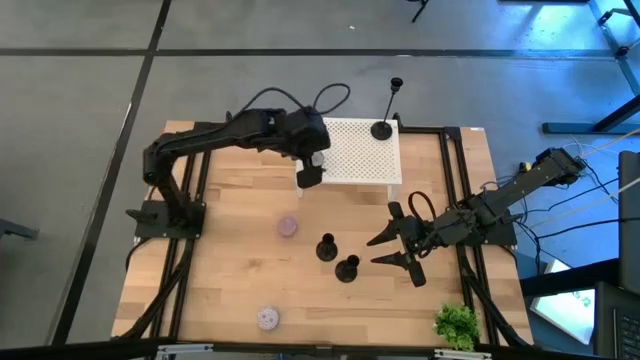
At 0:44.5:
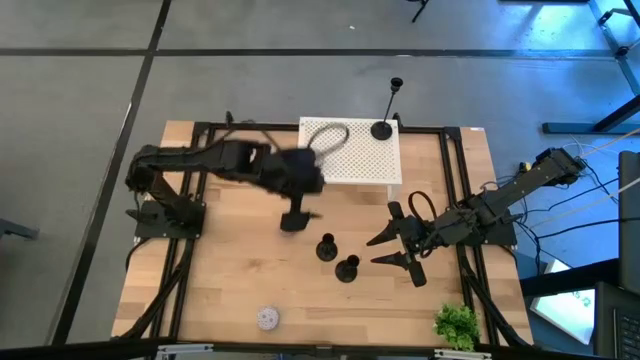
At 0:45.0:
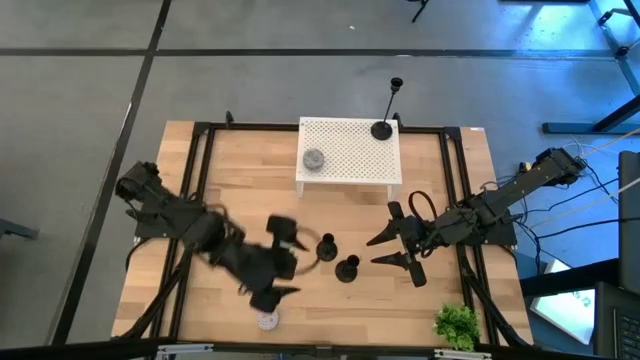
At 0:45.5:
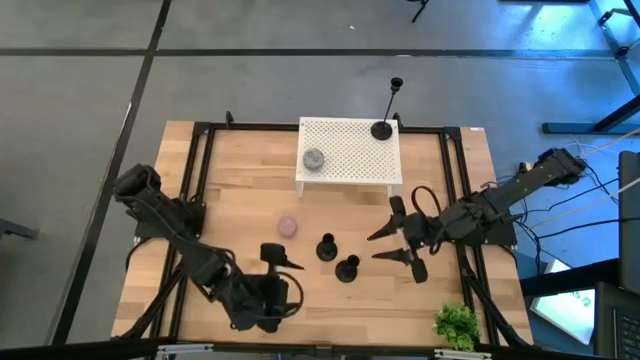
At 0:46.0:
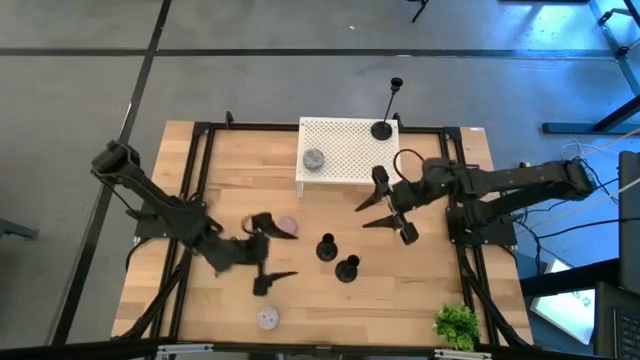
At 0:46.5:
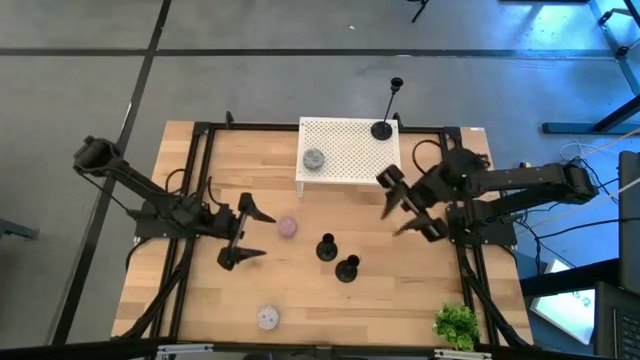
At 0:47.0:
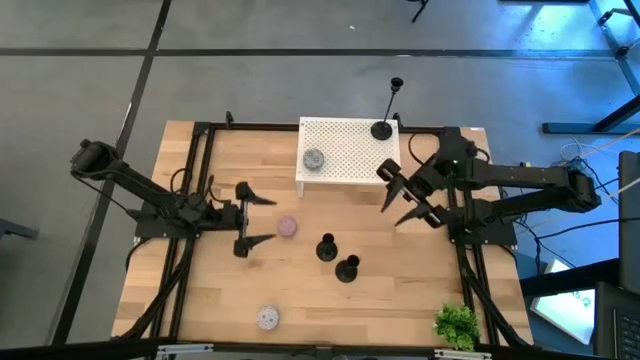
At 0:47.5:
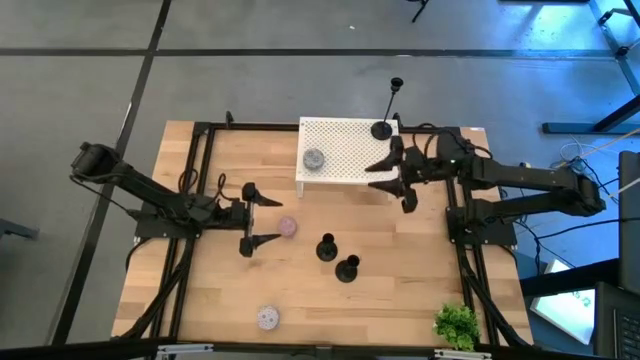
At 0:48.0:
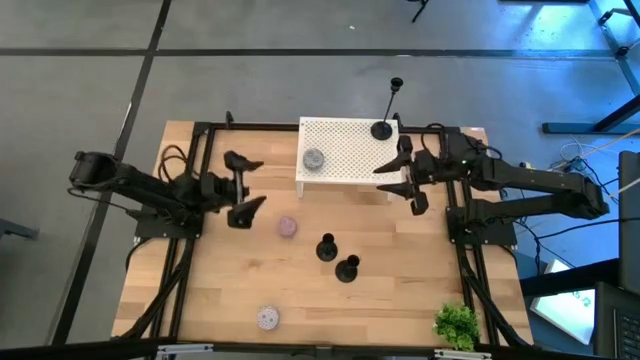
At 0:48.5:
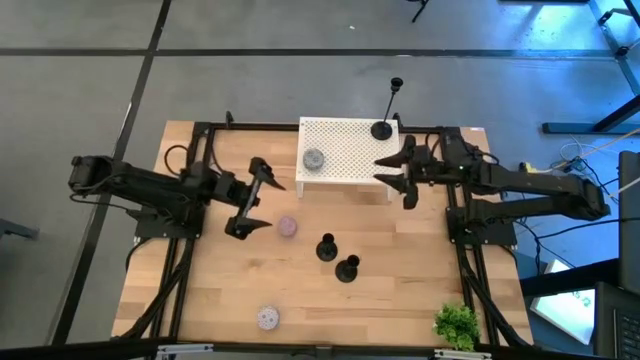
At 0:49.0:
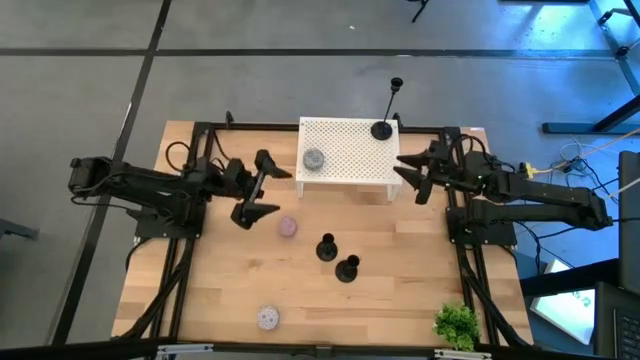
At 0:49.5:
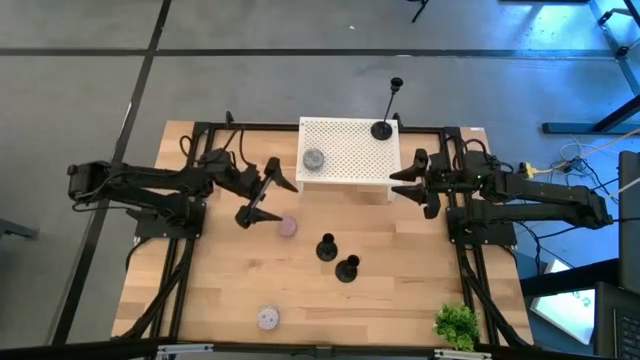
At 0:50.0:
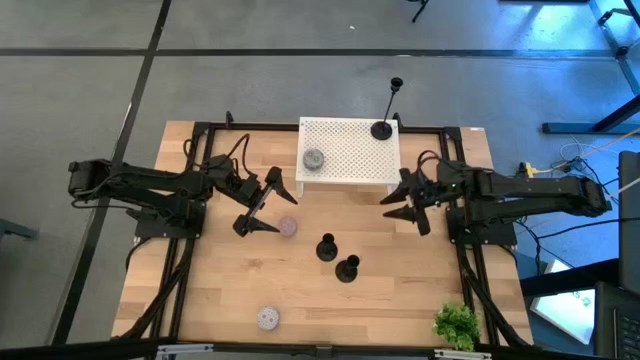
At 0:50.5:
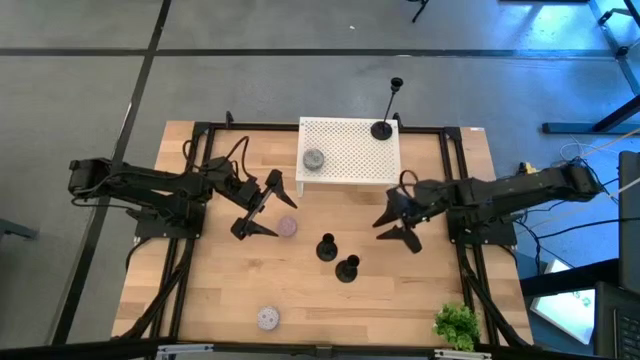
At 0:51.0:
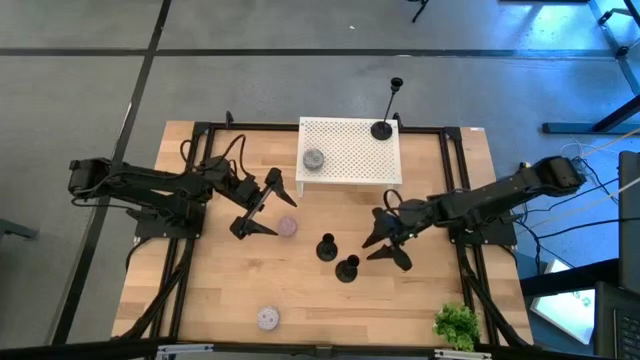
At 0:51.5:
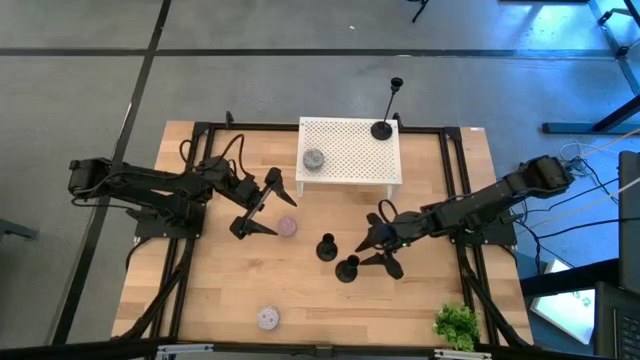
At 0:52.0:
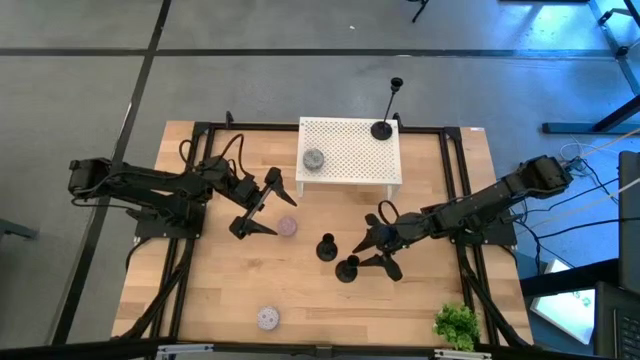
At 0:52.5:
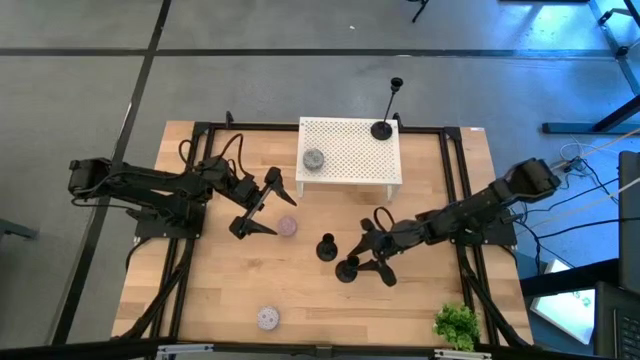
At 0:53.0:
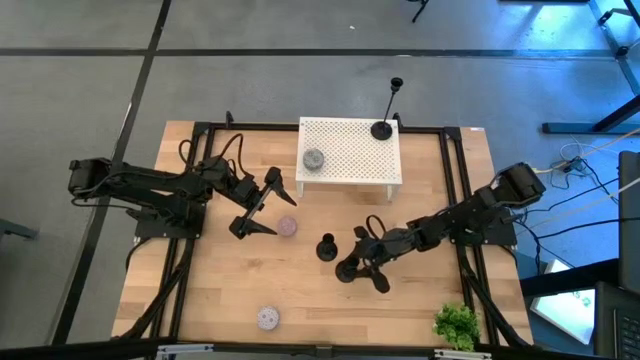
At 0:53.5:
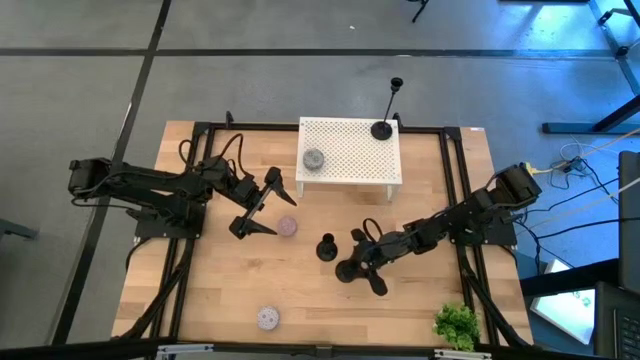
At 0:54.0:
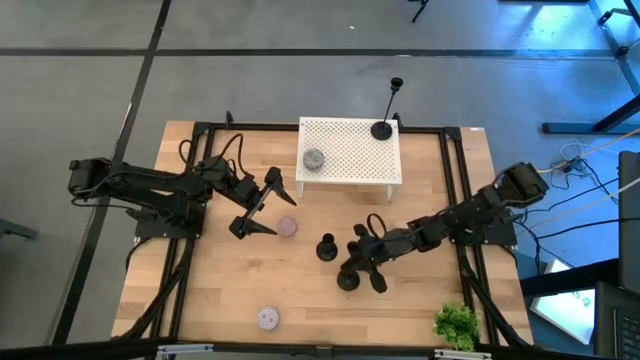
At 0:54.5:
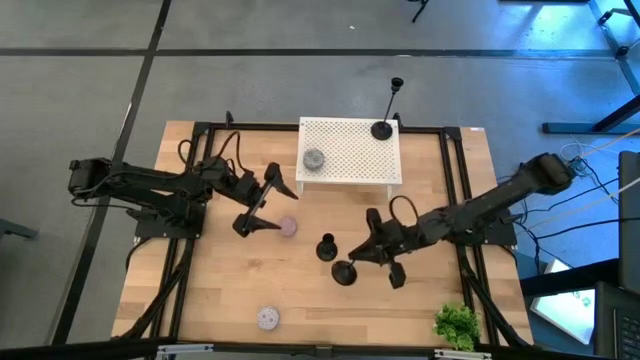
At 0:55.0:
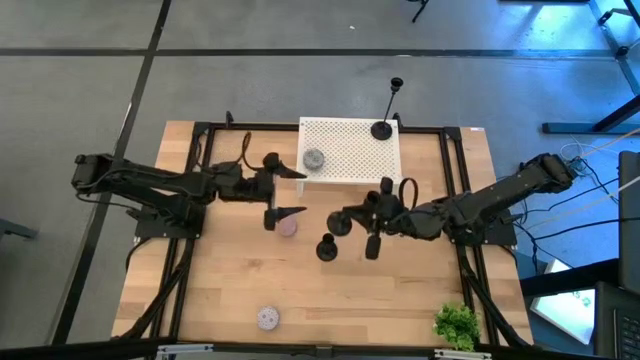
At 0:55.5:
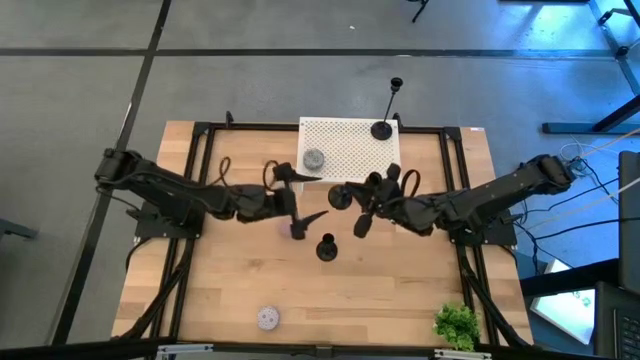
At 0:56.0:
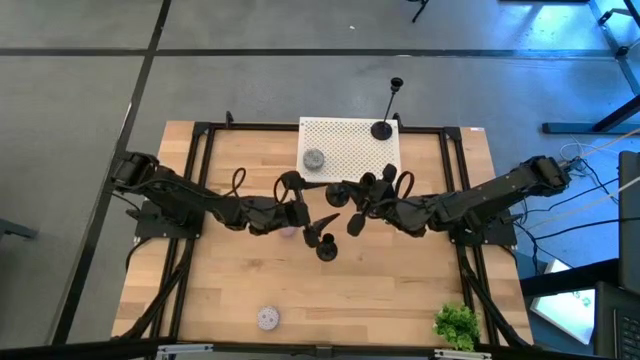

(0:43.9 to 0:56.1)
Task: Pick & Place candle stick holders
Put the bottom candle holder on the shelf aligned with the other candle holder

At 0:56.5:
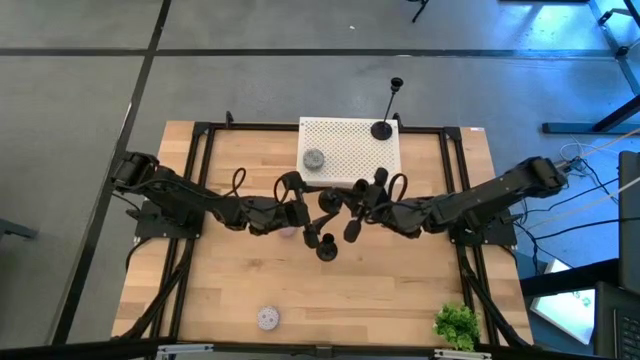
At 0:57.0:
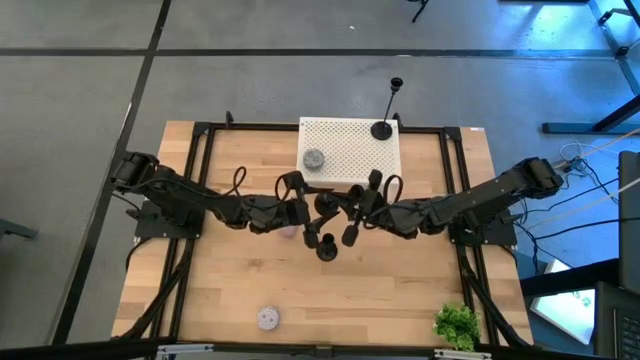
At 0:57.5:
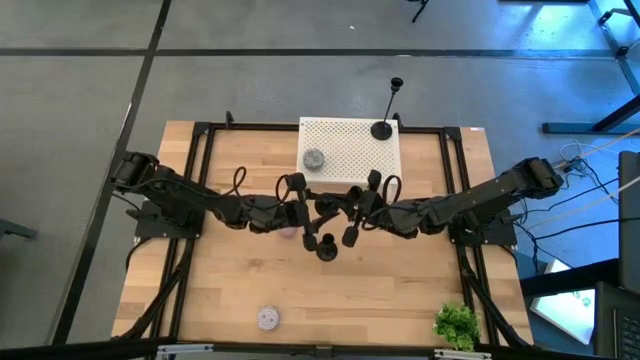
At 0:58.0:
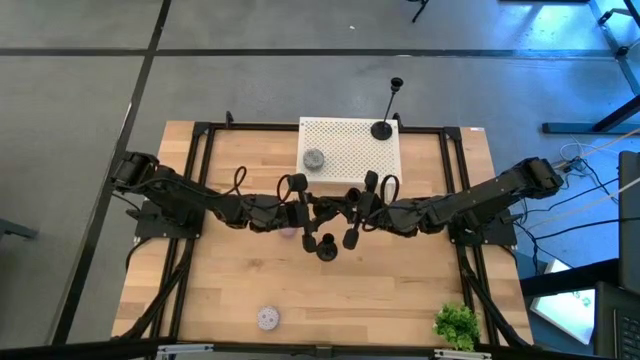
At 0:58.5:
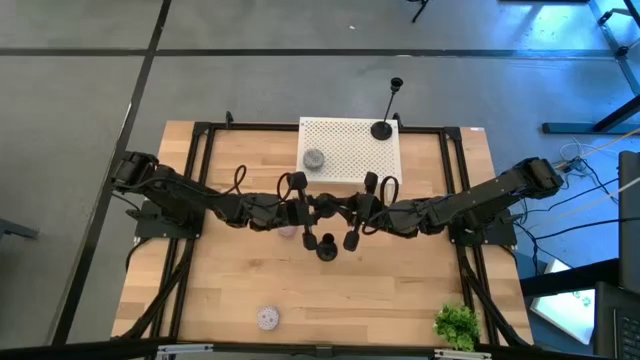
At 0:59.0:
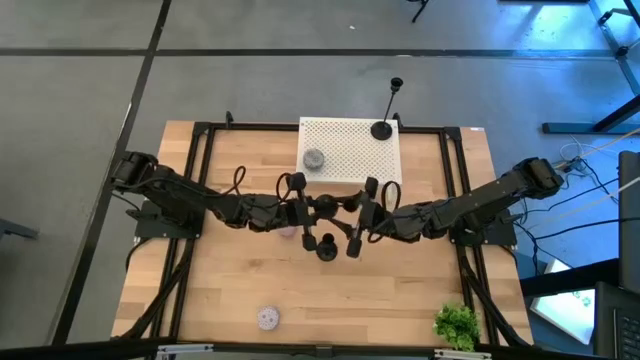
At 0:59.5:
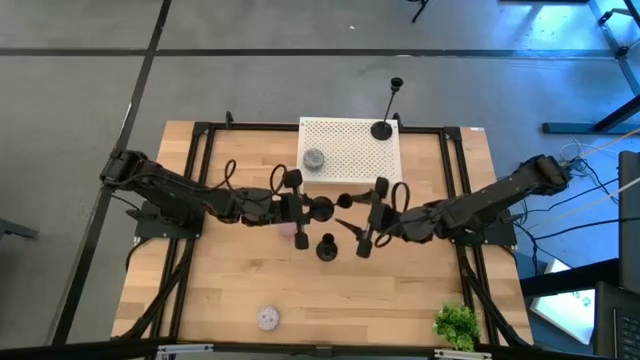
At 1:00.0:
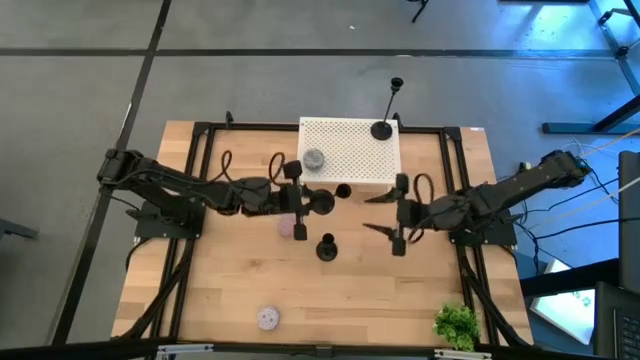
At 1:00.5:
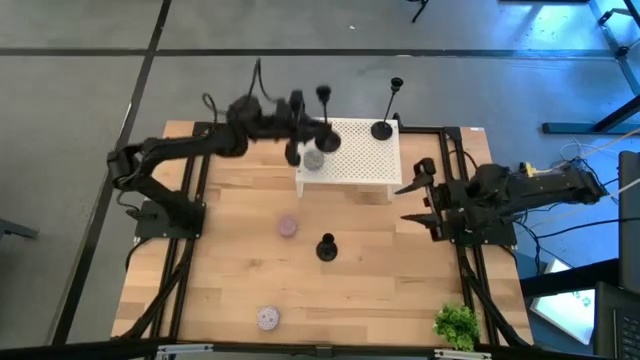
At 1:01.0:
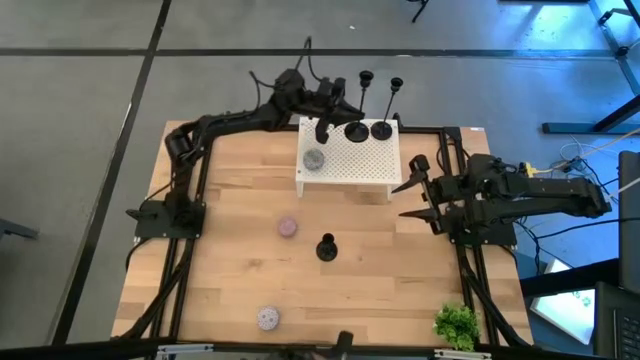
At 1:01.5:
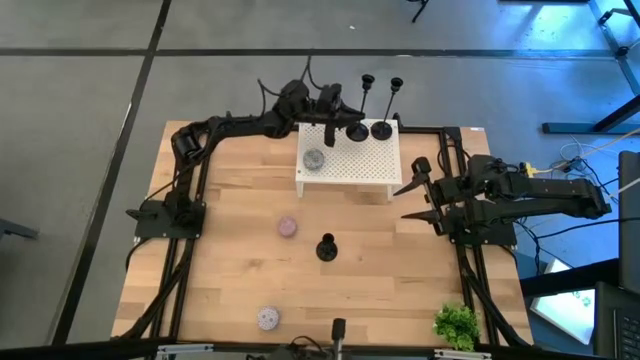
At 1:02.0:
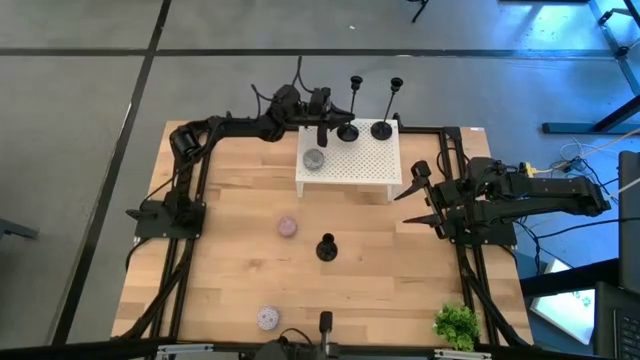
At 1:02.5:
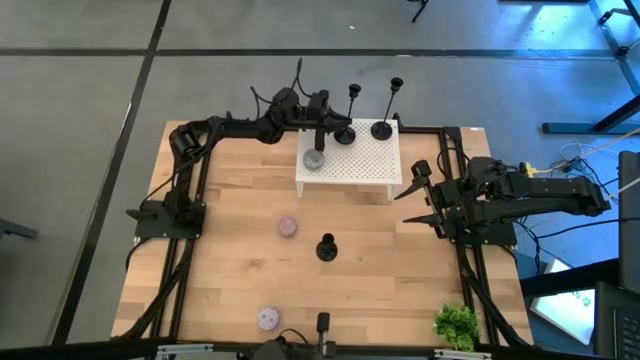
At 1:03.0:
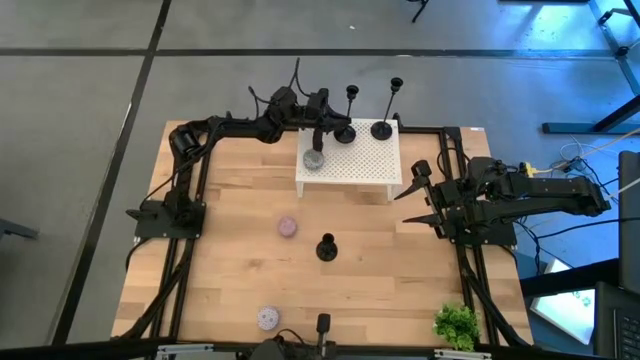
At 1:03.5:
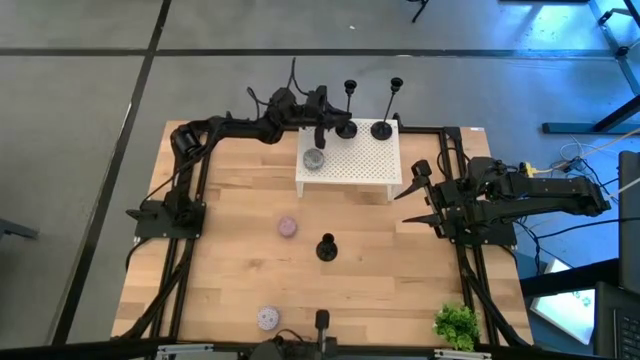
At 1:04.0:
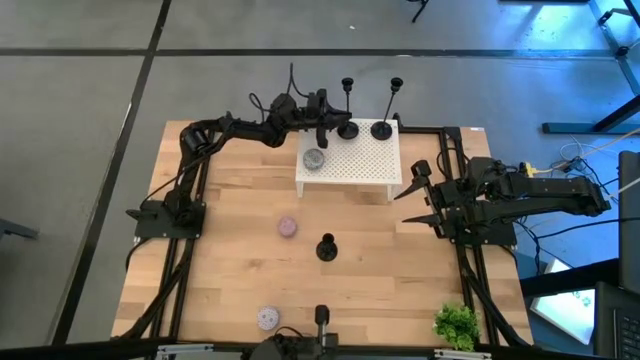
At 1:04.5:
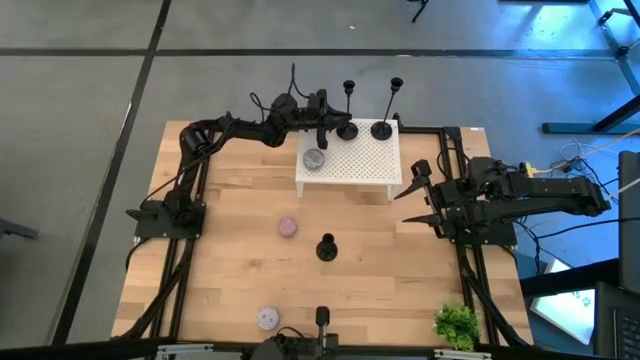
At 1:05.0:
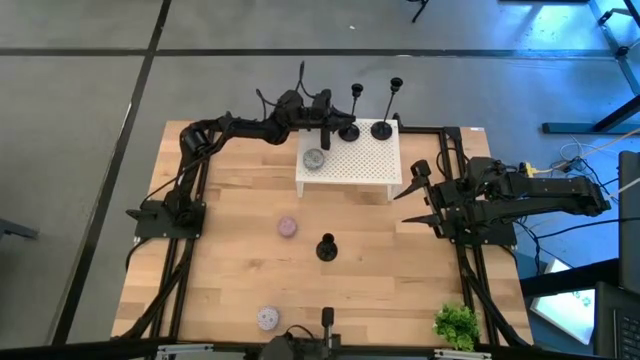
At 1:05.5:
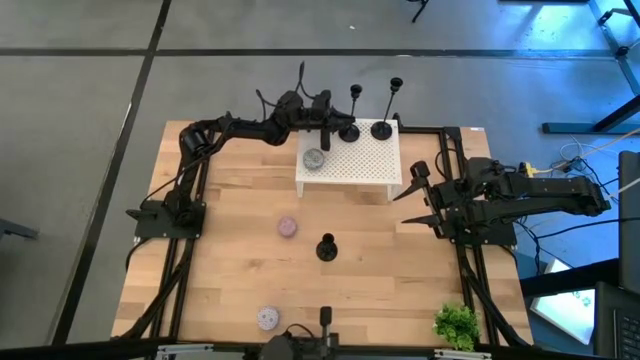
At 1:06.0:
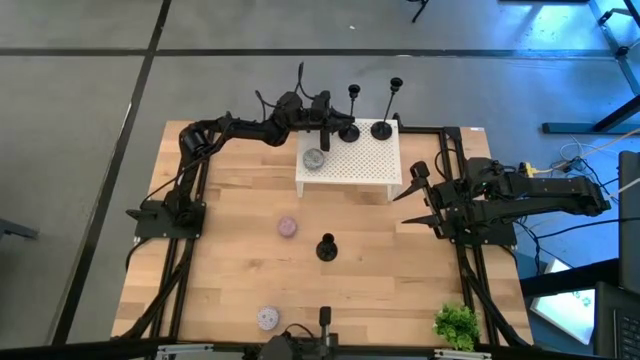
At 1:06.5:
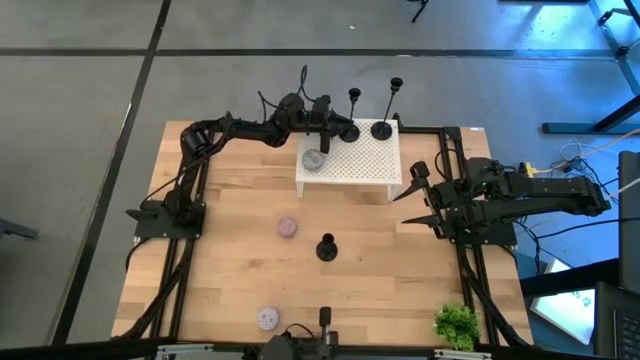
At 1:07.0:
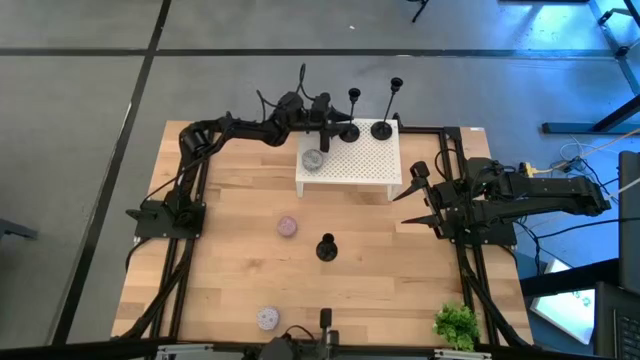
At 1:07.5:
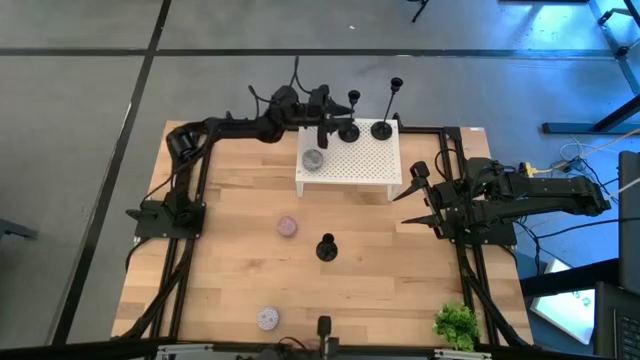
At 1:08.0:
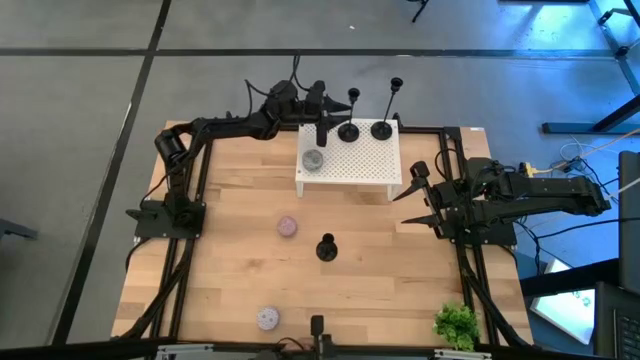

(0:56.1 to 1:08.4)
Put the bottom candle holder on the shelf aligned with the other candle holder
